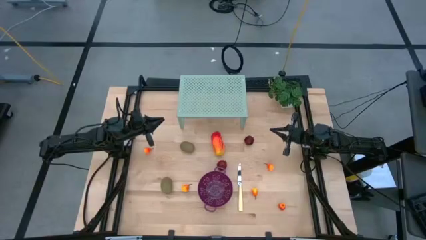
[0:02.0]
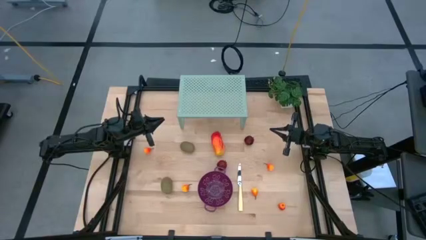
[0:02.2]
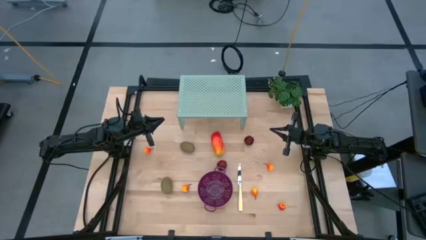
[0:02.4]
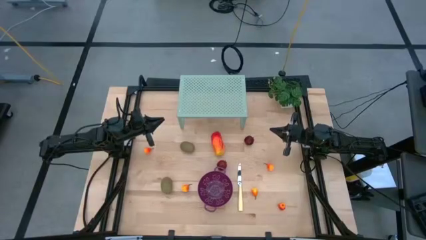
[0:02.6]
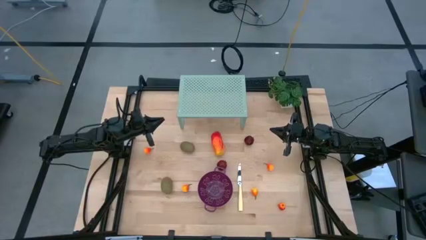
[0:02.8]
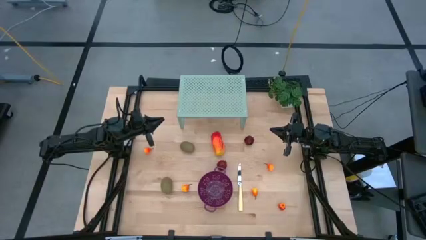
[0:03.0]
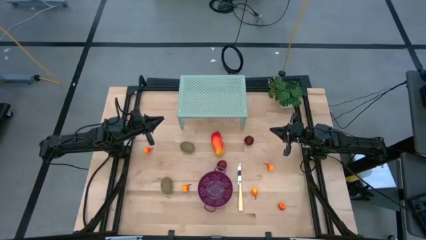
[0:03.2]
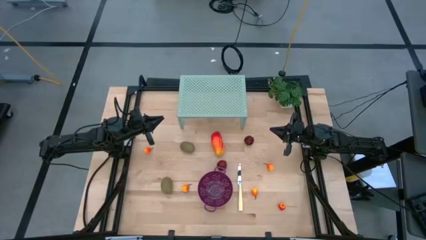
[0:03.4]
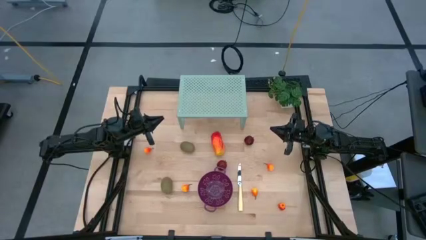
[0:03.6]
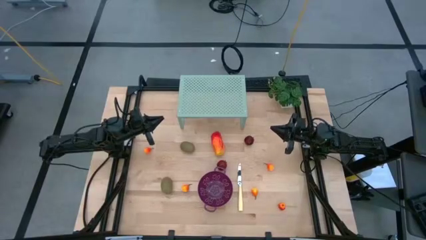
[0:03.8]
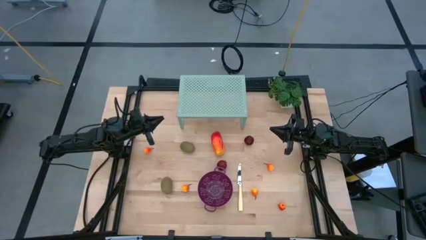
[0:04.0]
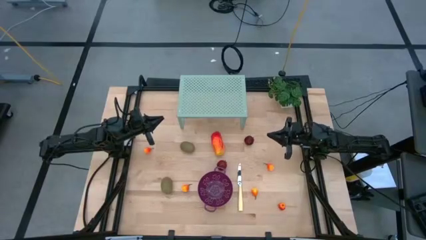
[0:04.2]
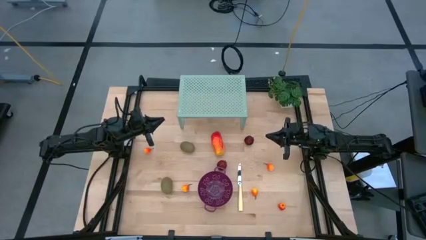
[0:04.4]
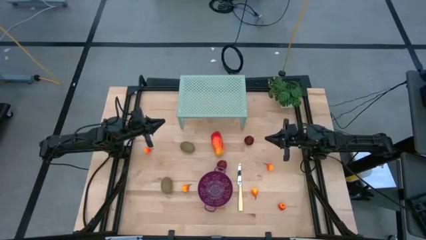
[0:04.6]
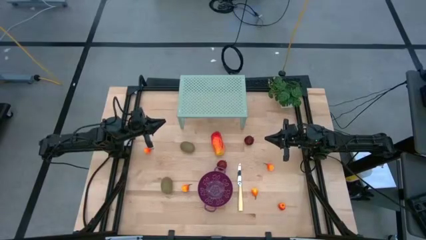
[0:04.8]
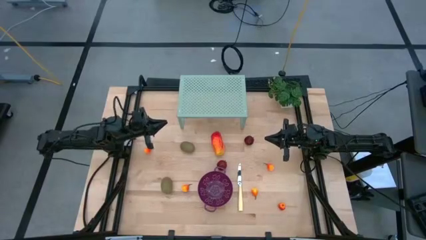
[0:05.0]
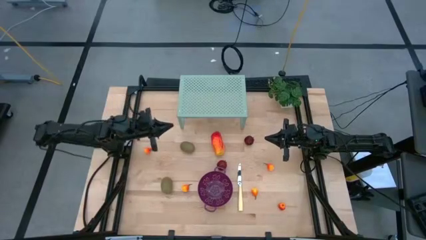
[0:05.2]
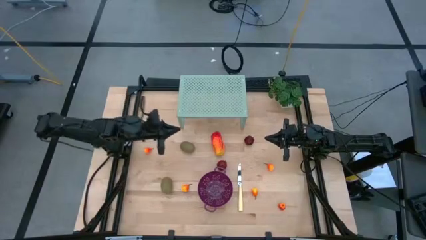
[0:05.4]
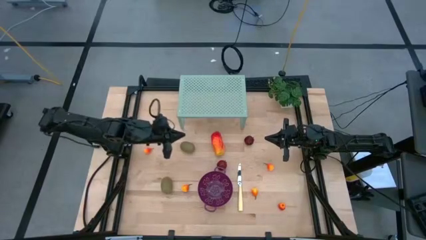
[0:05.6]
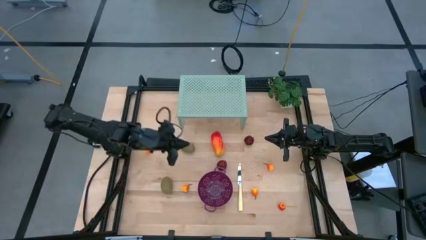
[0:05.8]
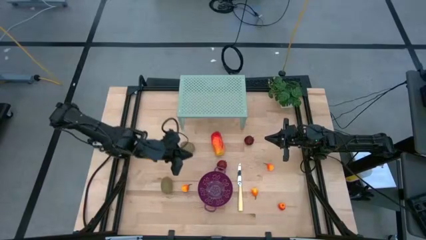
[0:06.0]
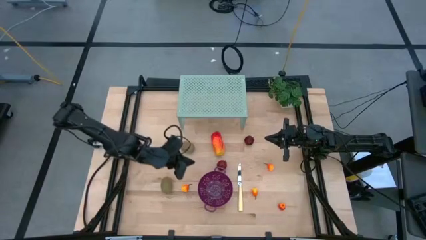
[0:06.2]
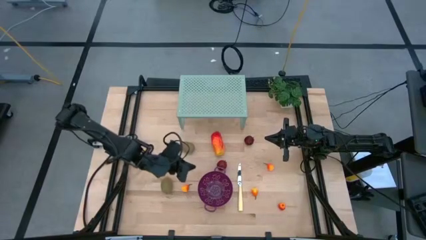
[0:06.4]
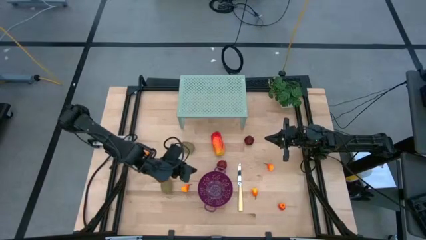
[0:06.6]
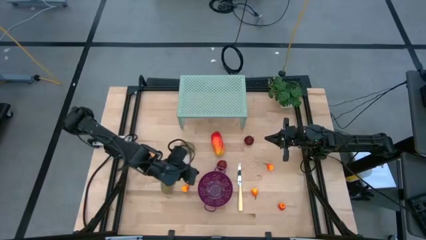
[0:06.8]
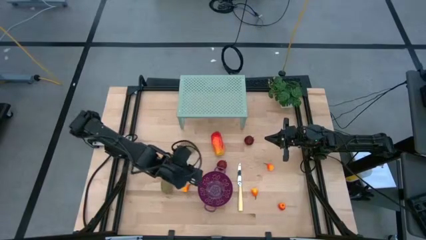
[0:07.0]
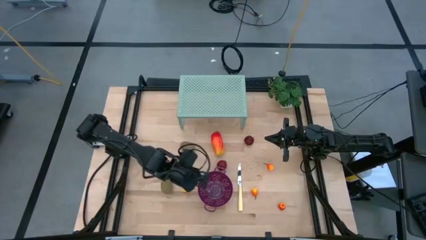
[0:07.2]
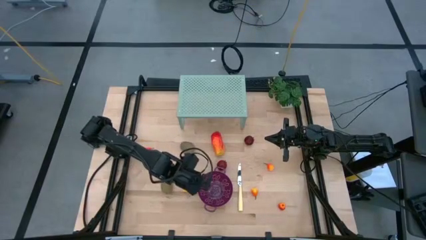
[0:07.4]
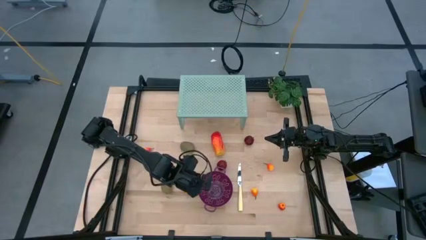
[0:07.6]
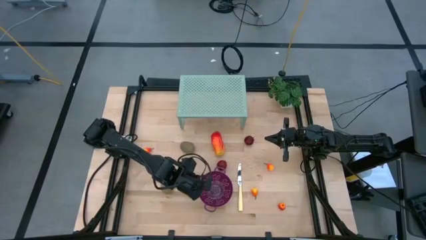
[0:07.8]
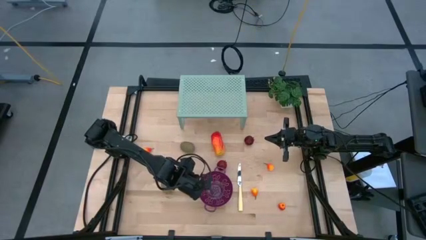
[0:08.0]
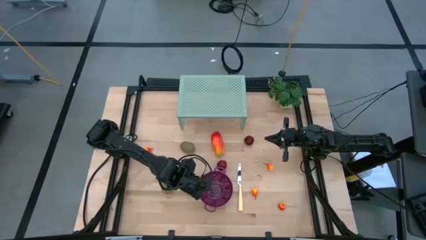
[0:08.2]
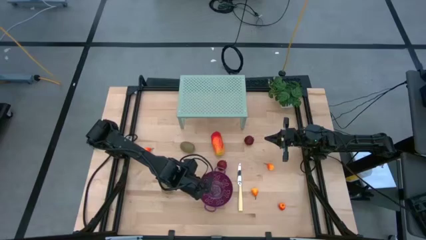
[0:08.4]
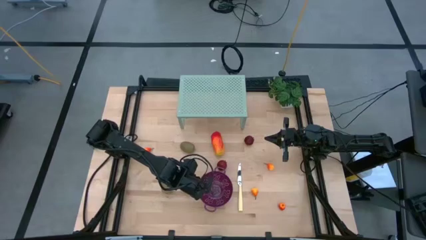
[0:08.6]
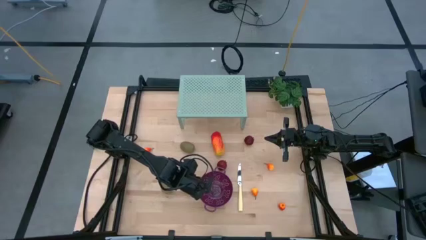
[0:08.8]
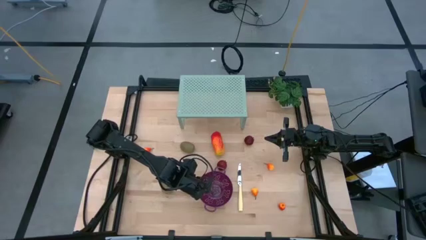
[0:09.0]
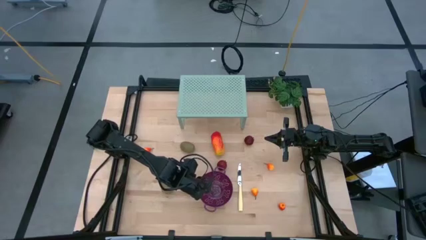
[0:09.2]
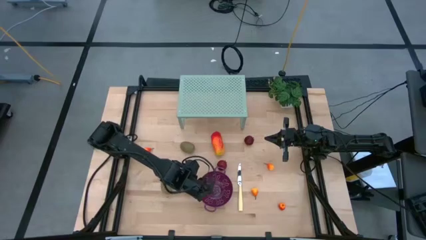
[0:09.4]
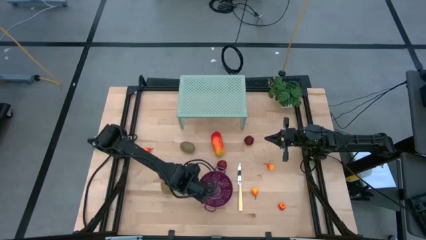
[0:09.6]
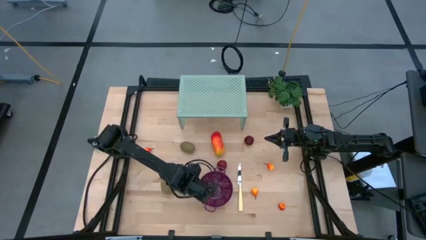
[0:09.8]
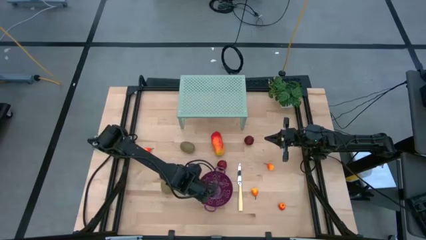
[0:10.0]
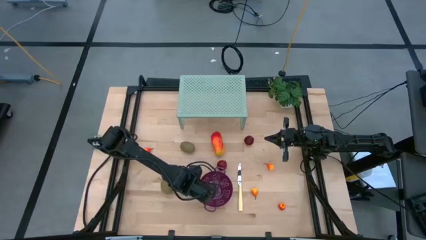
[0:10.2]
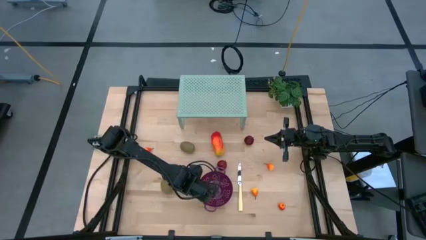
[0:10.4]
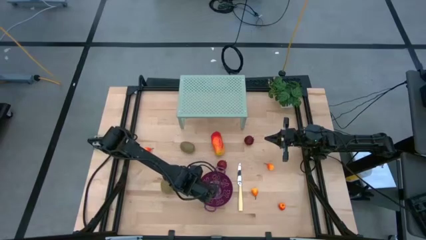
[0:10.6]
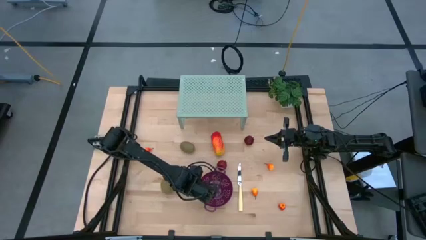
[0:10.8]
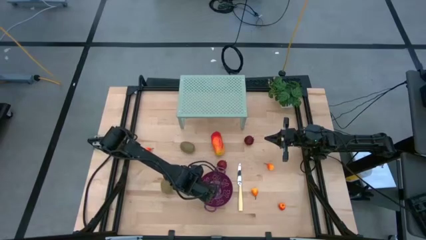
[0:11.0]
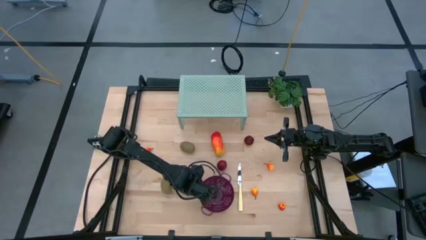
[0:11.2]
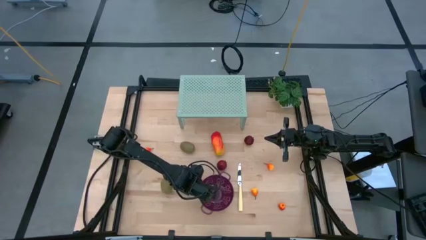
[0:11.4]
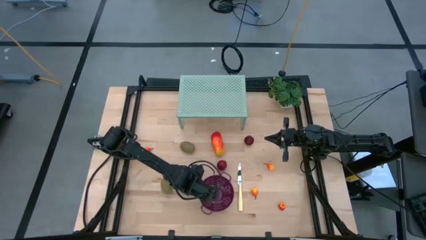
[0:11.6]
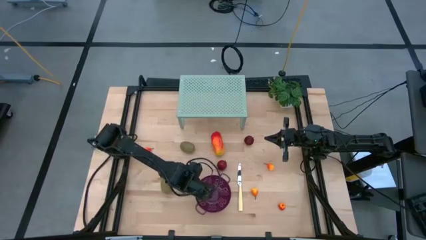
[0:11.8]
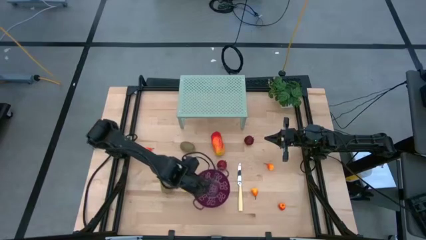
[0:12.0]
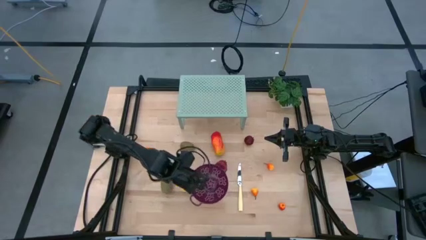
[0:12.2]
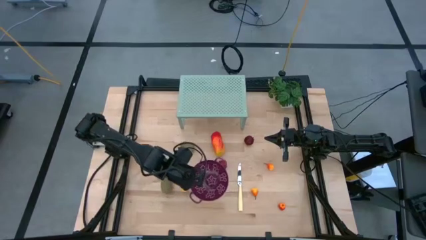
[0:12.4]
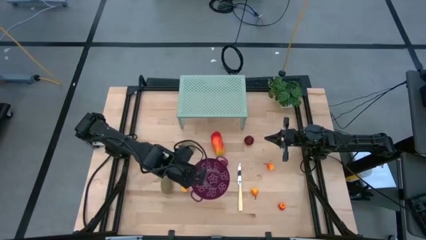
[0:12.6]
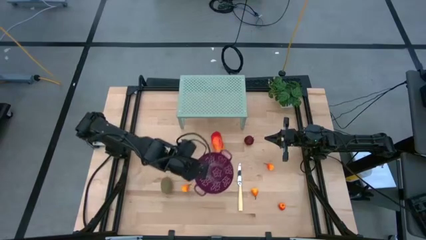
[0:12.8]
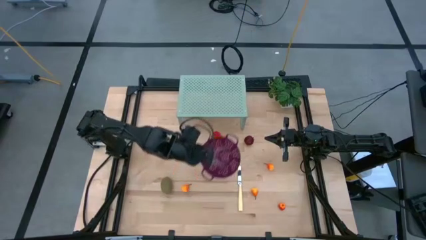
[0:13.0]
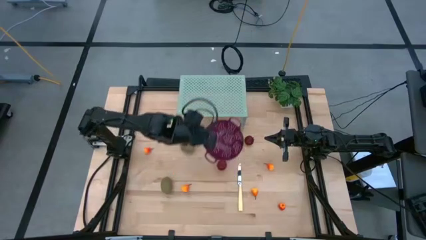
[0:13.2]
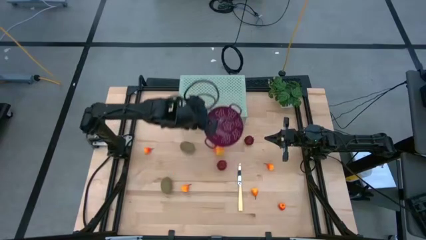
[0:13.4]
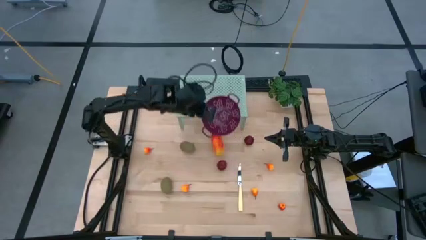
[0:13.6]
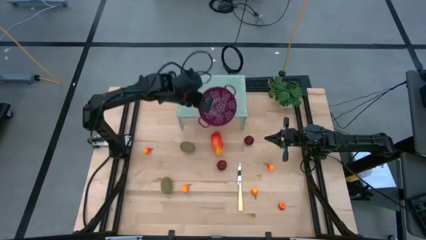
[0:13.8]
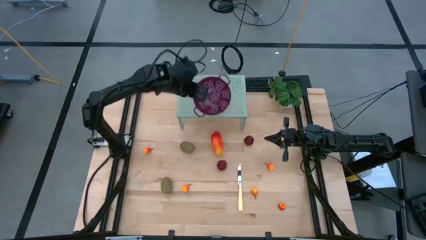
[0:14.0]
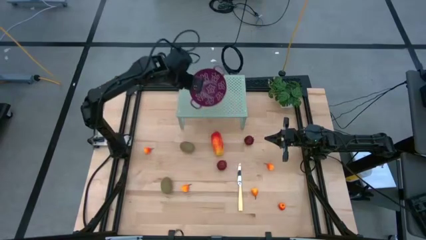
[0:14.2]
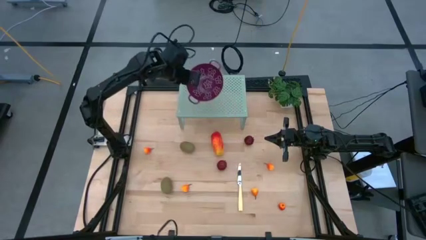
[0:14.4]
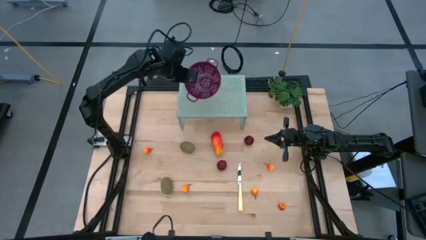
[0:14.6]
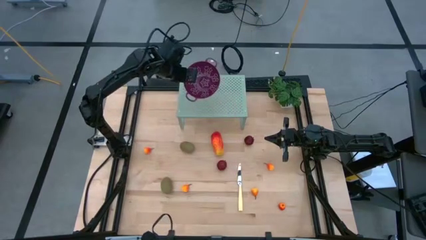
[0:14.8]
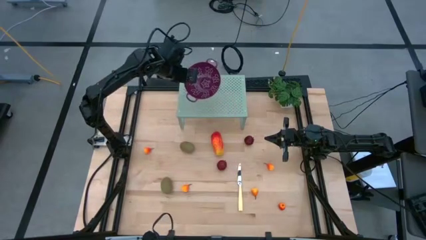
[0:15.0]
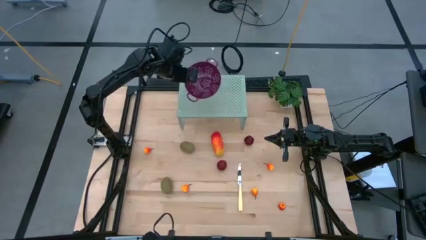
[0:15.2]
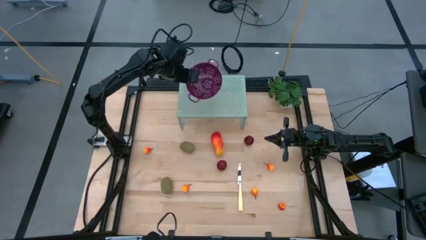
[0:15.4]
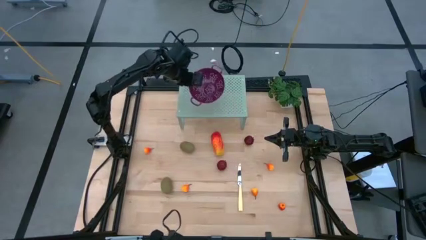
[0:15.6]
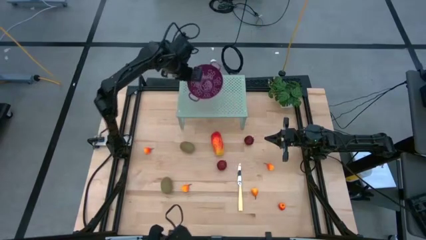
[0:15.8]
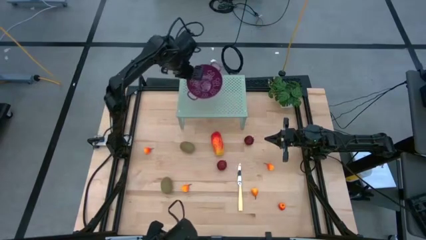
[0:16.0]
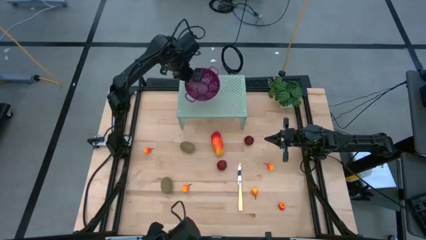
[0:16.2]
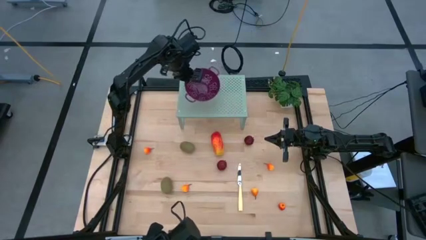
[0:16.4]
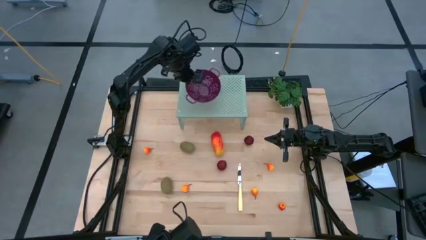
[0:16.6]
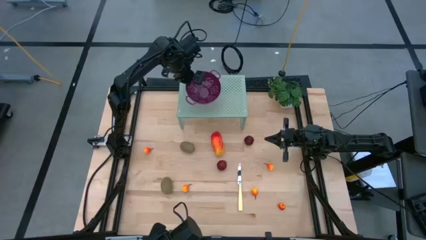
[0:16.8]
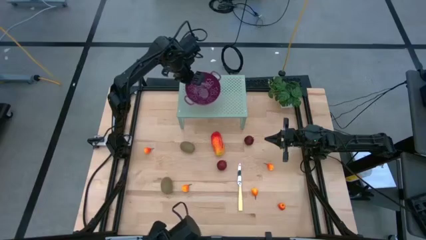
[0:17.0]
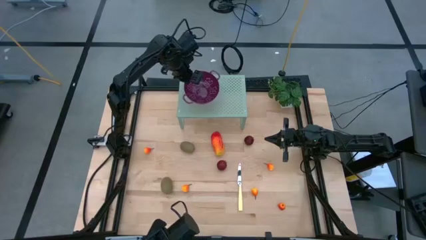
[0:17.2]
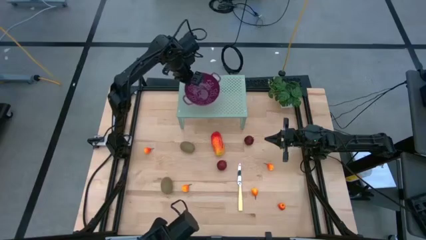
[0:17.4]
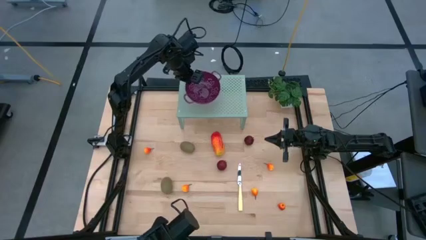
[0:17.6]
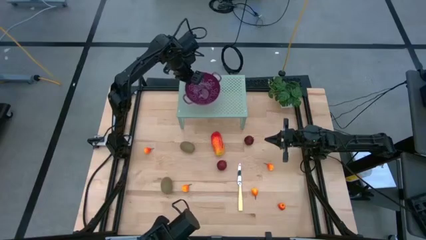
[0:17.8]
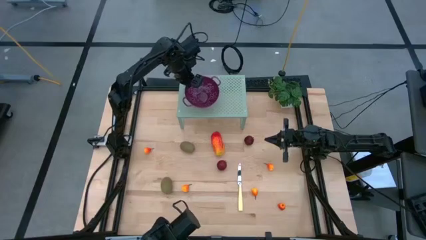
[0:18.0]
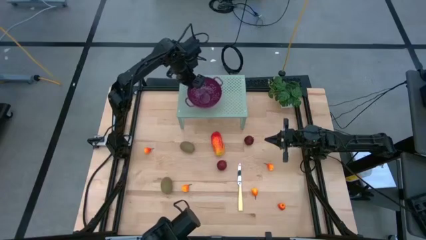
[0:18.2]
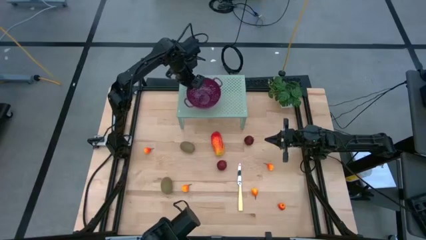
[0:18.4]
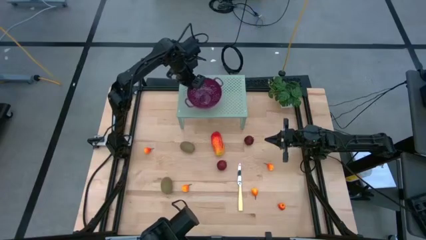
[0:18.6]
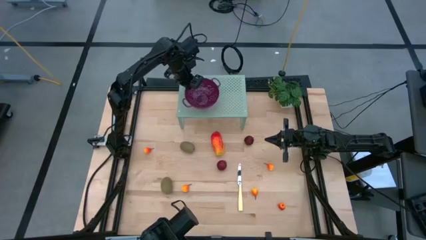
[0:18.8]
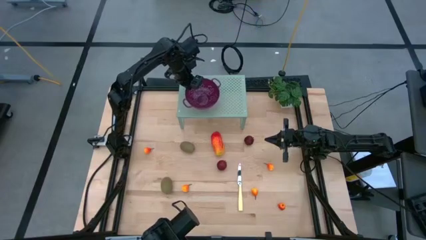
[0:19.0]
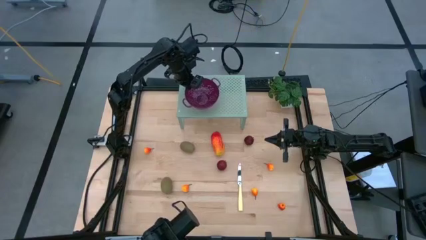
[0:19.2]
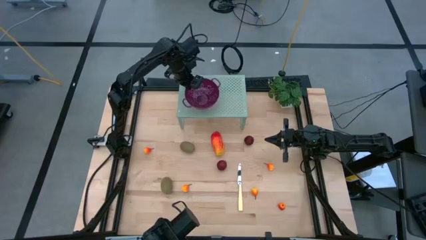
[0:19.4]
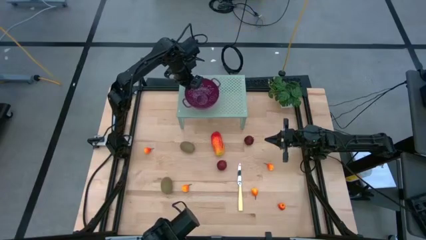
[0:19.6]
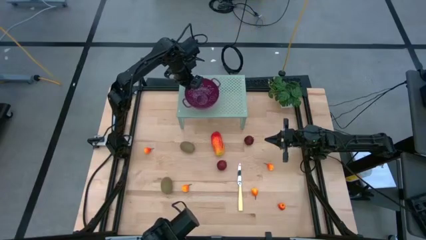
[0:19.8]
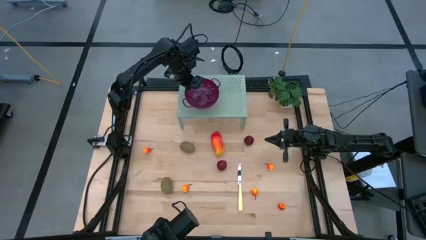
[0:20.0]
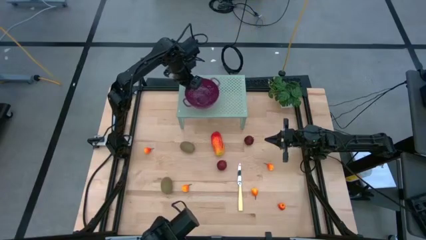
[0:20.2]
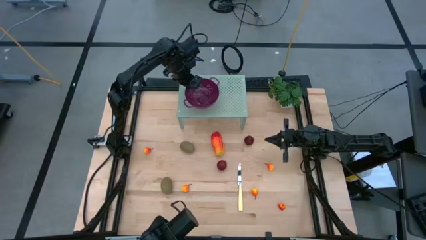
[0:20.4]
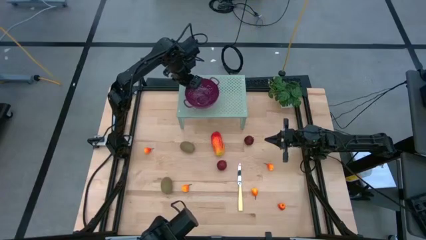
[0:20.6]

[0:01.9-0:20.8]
Task: Pick & Place Fruit
Put the violet strainer bowl on the shelf
